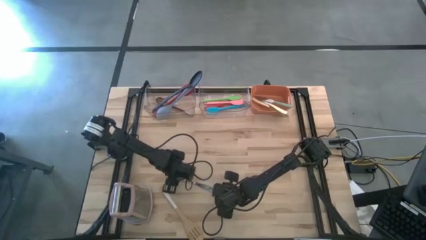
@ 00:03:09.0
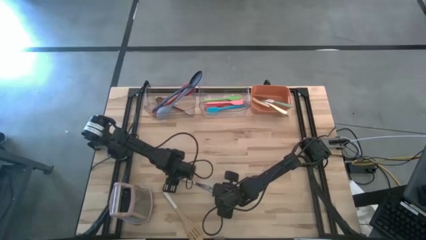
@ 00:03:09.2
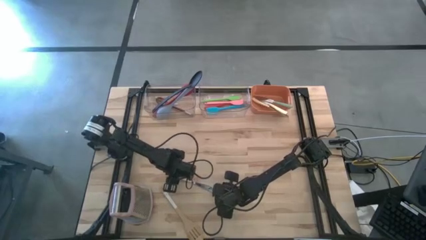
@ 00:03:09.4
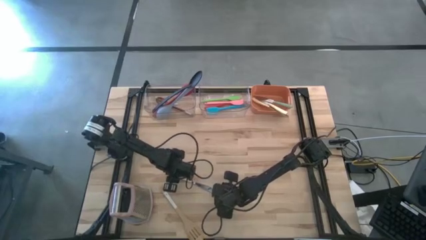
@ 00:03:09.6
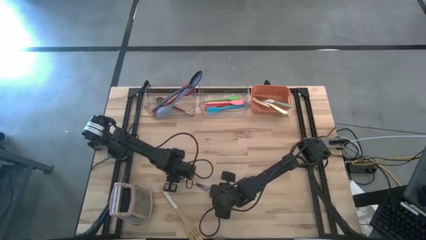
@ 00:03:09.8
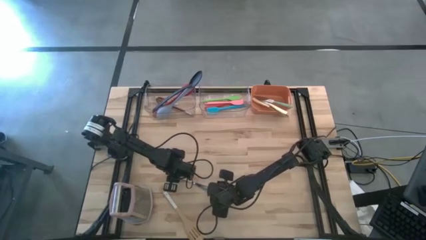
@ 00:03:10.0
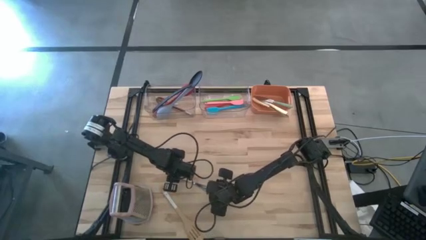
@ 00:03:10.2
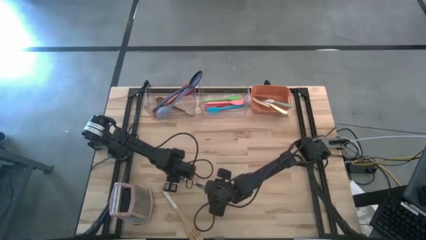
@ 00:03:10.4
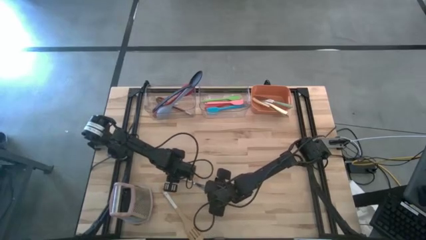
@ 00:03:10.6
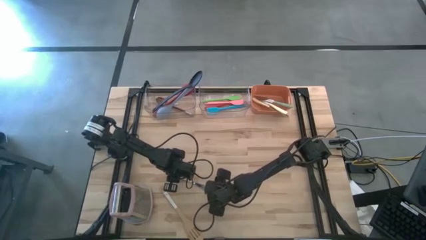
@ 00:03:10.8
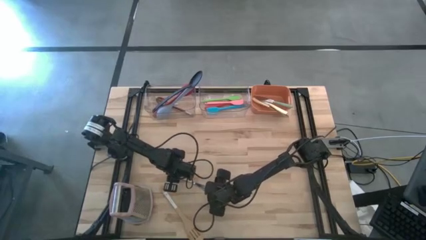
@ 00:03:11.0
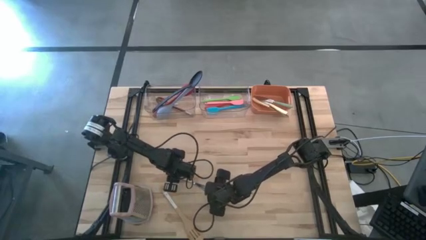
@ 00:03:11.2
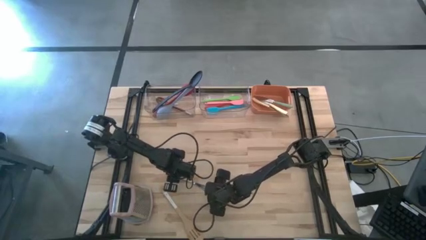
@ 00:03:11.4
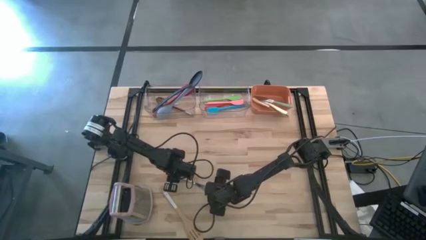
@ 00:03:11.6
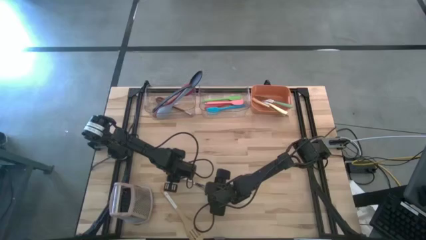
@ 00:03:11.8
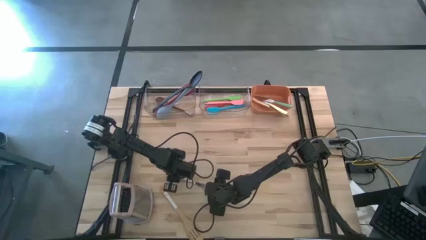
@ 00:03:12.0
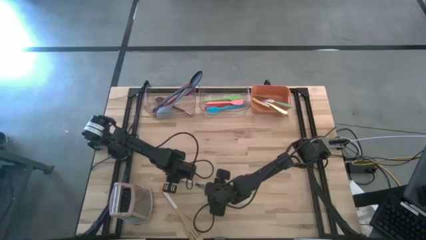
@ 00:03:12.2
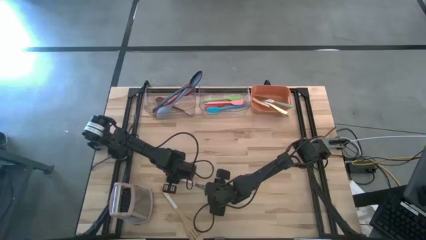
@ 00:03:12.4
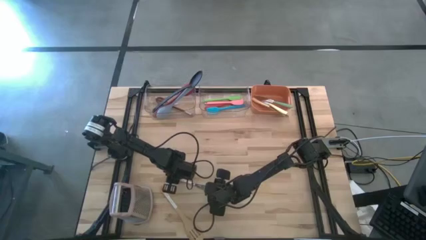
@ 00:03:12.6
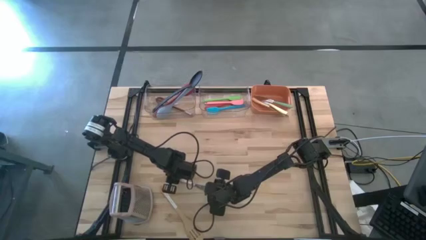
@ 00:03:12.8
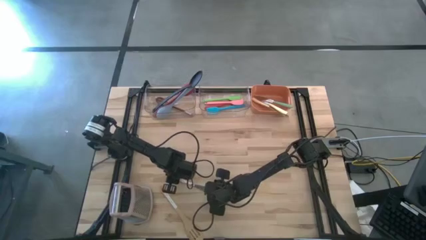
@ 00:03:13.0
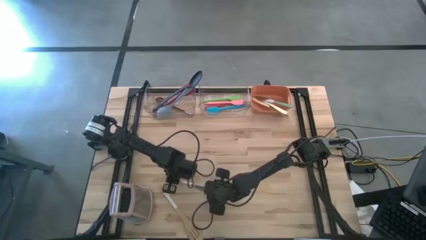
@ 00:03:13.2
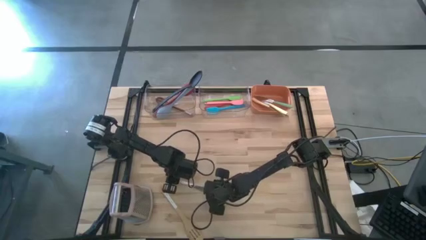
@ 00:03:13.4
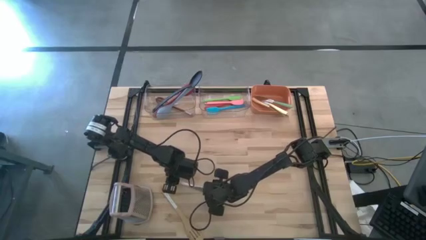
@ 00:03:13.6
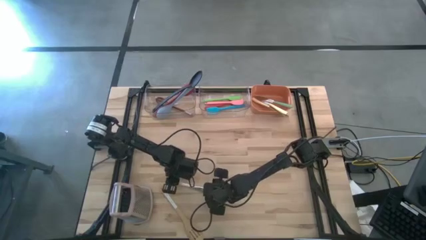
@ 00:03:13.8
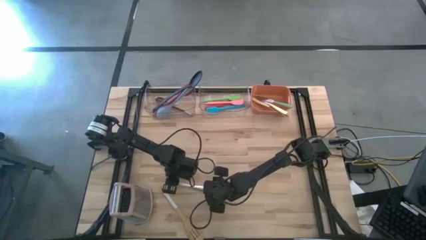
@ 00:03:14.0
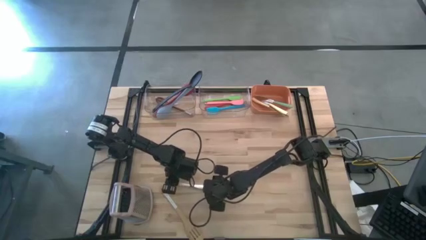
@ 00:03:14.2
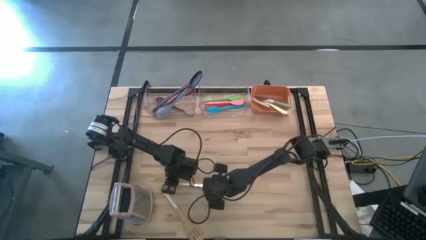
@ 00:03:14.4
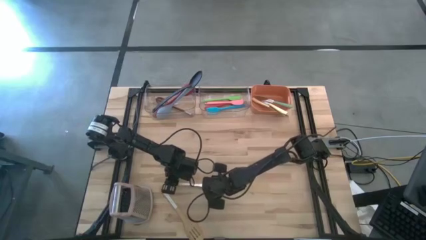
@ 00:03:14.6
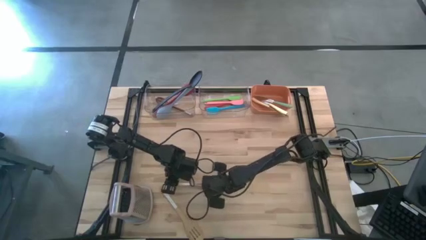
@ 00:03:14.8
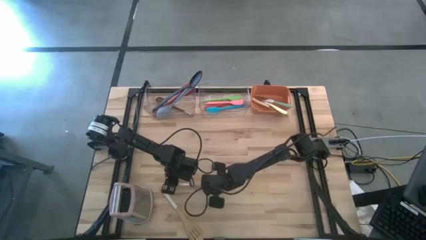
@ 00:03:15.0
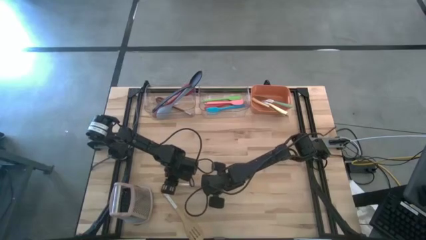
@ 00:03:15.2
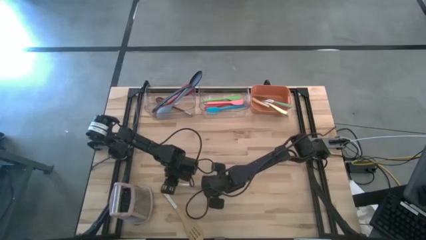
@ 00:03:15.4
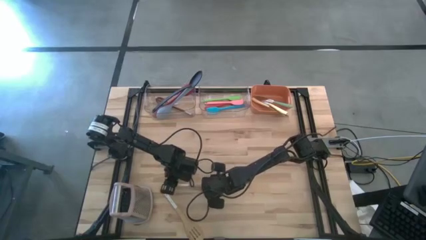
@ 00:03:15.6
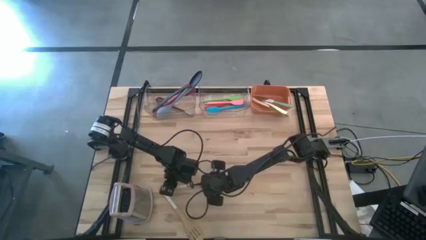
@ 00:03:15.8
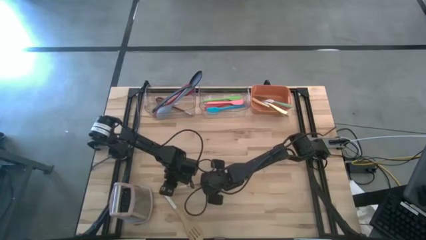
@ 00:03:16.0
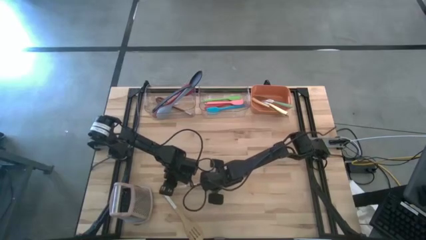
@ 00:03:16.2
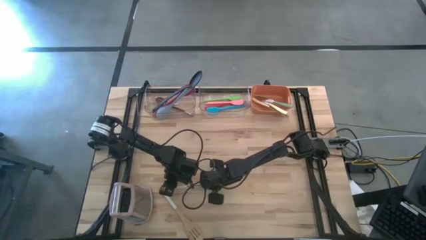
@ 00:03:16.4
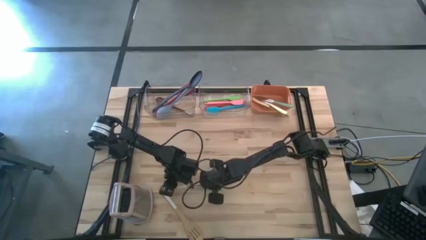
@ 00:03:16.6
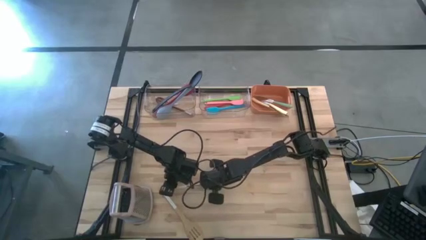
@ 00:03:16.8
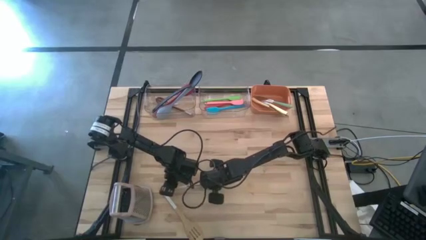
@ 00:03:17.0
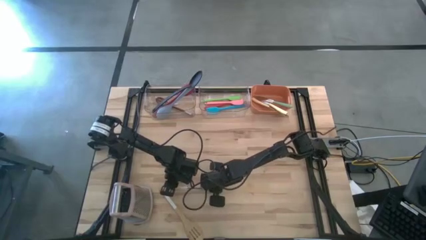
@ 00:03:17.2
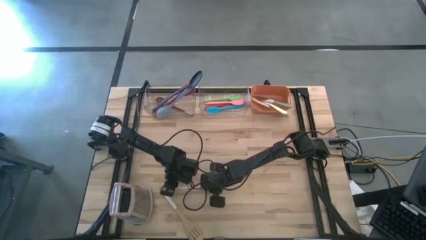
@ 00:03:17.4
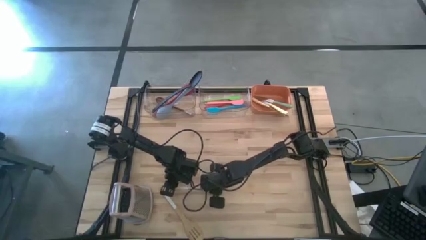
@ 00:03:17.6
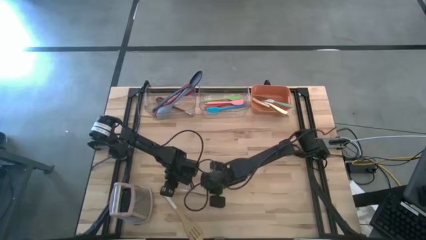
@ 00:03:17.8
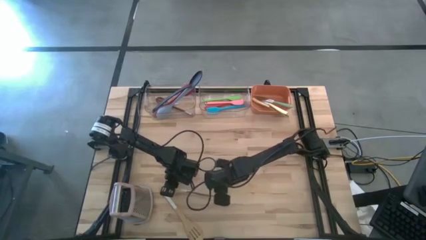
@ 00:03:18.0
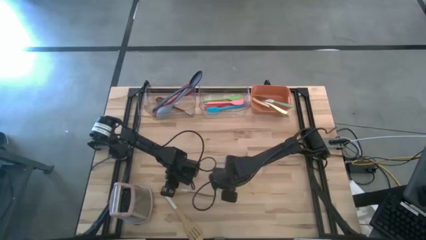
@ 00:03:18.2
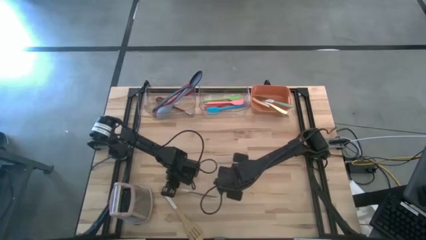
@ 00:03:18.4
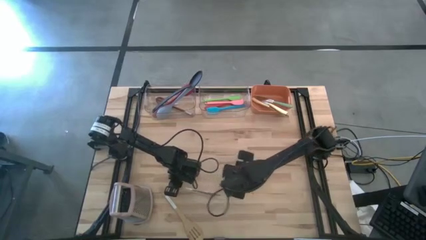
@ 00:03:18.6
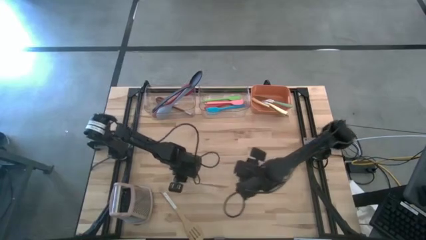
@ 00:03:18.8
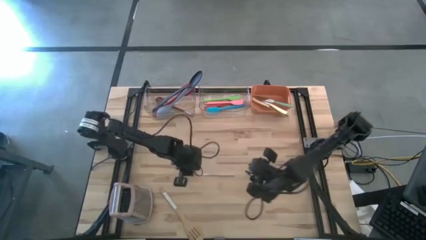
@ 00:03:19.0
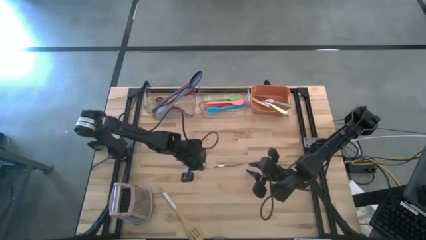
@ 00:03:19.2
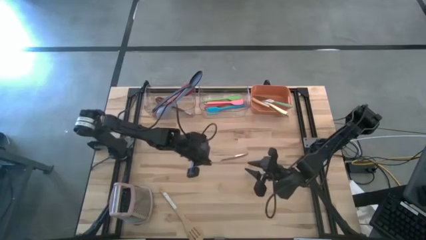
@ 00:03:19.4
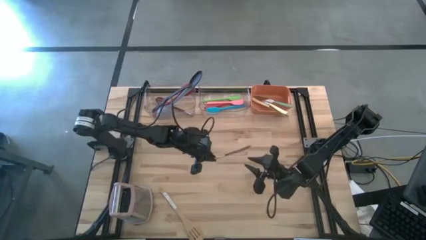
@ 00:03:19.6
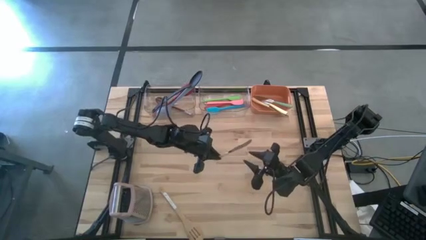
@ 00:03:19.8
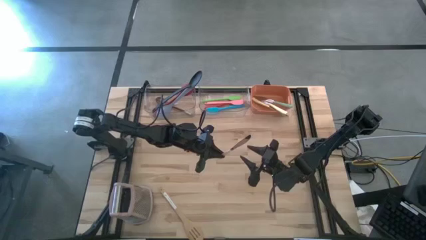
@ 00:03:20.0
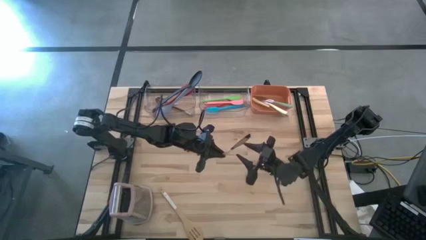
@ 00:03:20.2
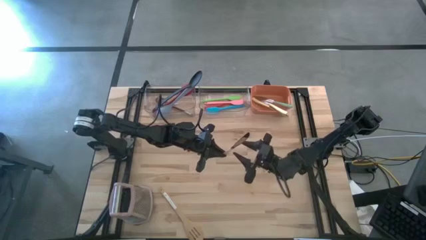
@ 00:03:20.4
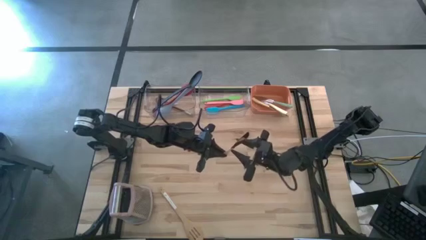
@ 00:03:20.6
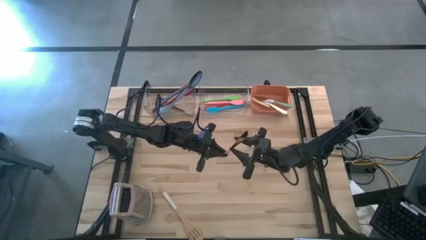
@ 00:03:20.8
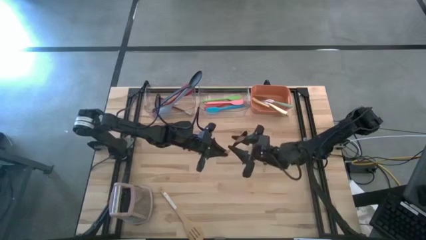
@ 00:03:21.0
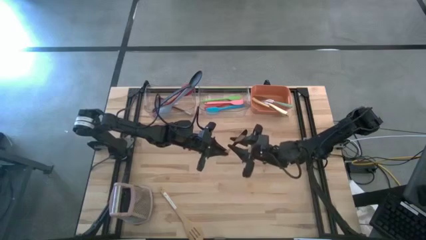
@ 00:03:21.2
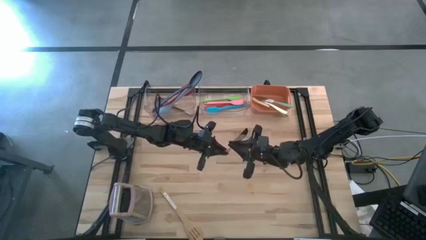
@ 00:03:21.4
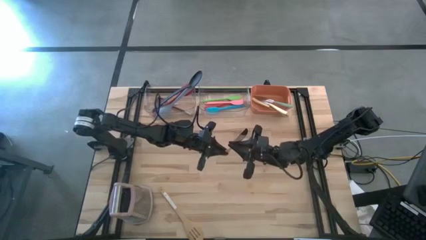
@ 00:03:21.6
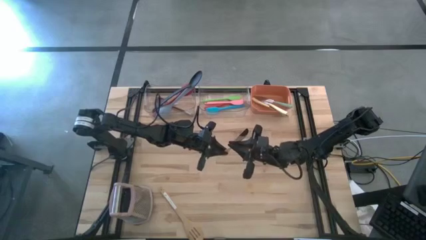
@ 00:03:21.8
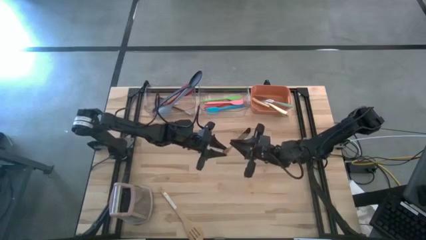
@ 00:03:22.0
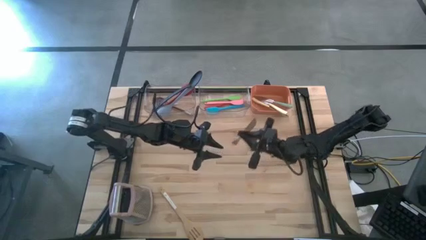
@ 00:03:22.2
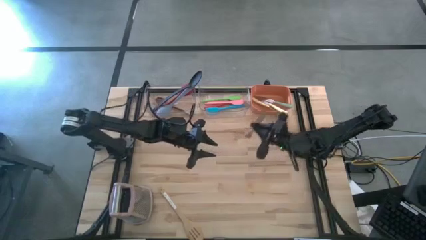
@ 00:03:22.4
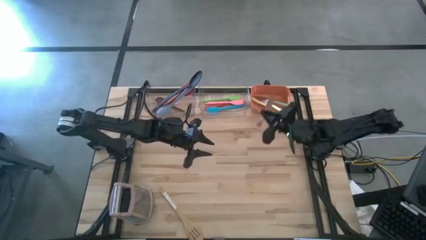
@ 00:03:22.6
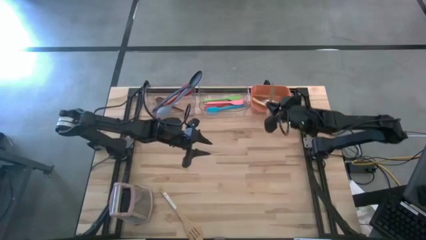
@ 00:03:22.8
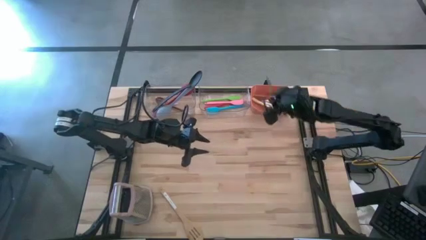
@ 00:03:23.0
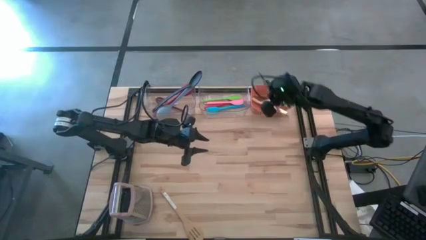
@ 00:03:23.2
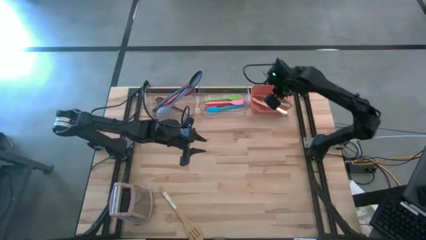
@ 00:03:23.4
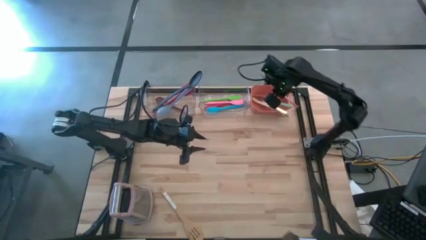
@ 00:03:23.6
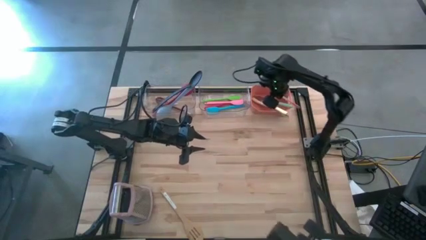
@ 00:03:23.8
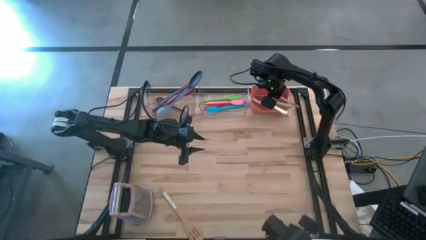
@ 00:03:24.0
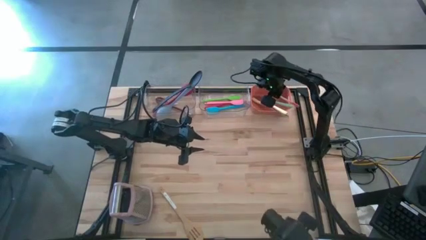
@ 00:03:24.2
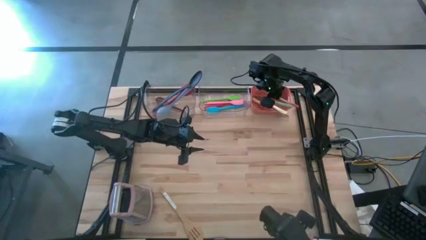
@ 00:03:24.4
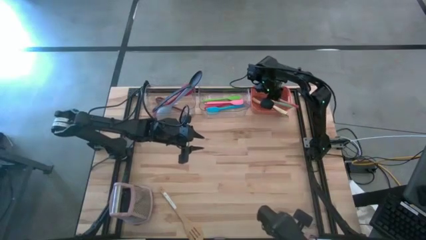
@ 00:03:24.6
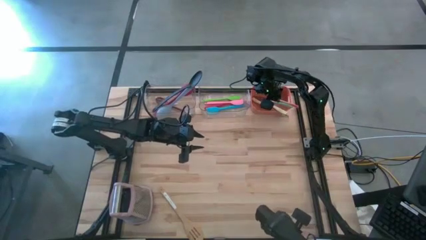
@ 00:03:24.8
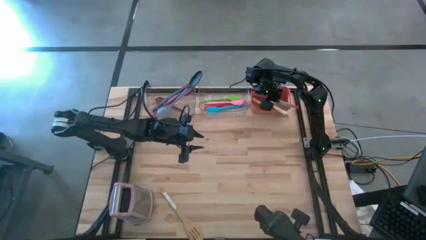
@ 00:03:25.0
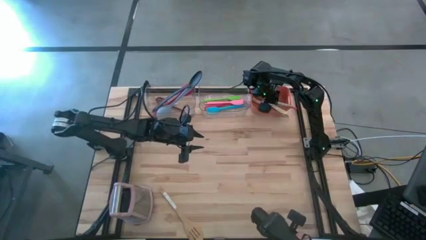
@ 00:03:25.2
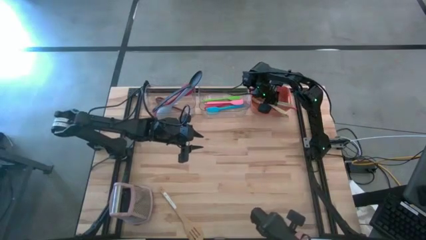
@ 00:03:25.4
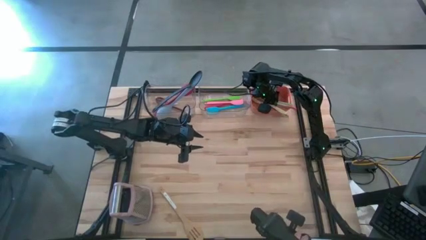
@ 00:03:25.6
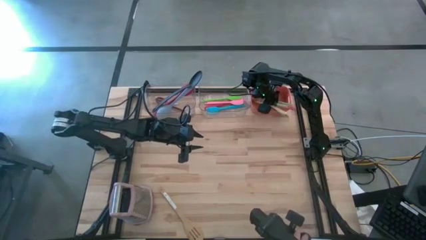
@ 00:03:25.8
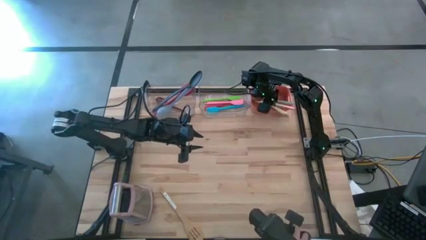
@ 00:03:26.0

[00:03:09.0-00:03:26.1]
Task: Pick & Place Kitchen Items
Put the orange knife into the orange bin
